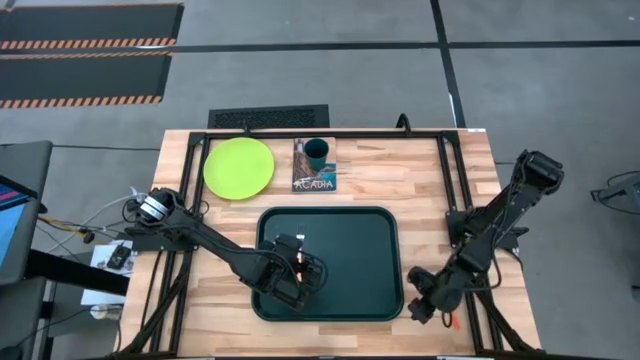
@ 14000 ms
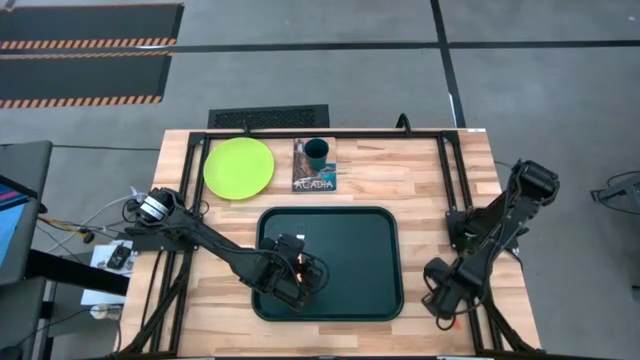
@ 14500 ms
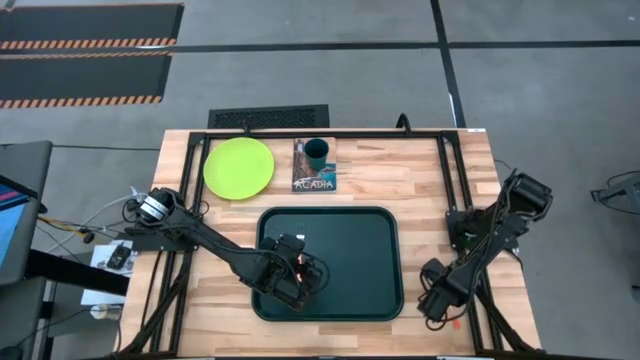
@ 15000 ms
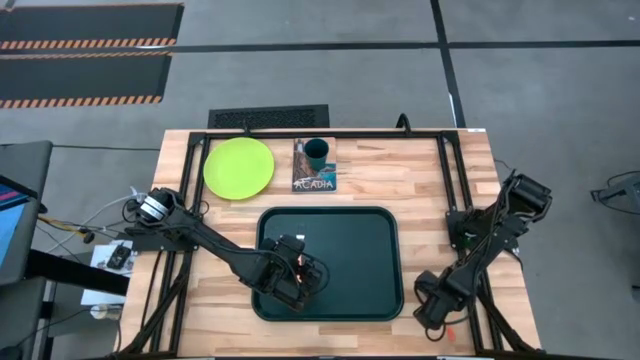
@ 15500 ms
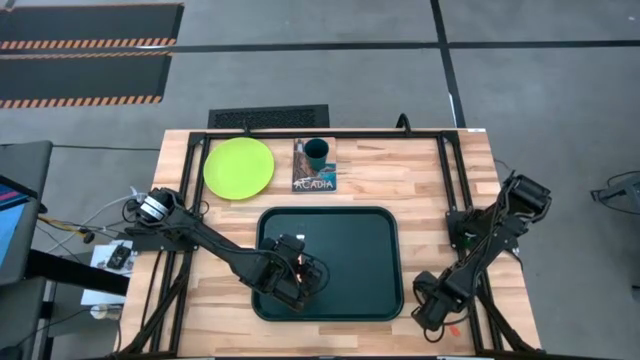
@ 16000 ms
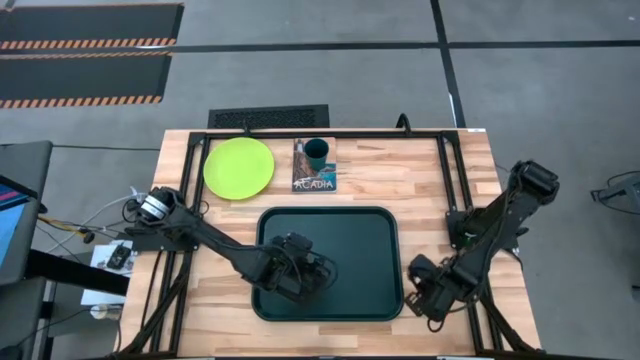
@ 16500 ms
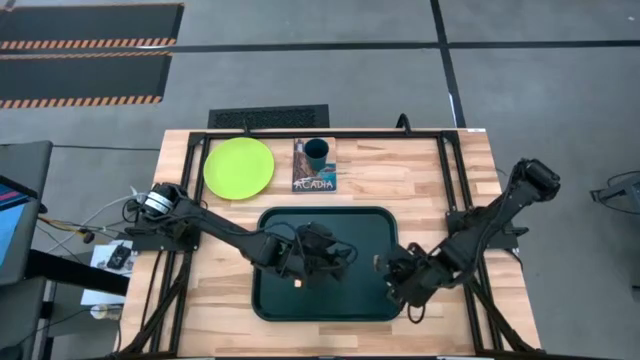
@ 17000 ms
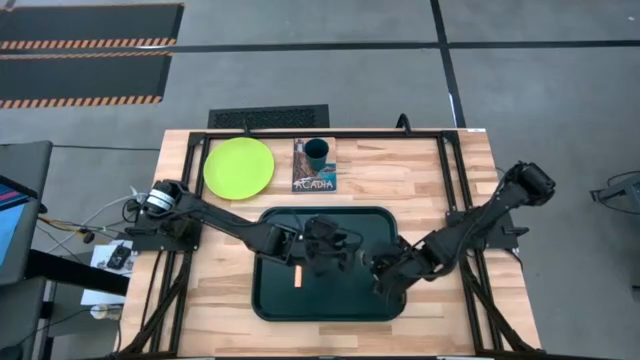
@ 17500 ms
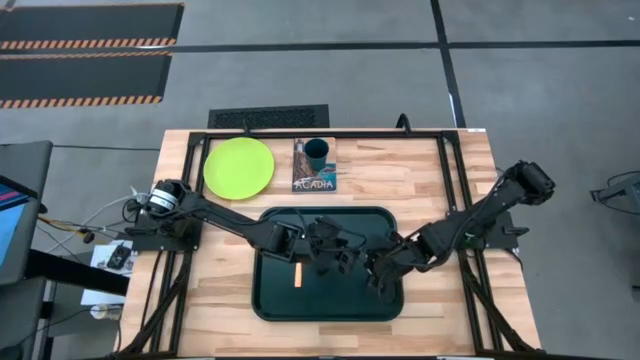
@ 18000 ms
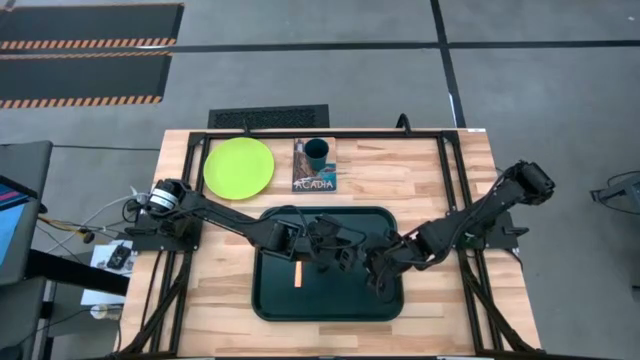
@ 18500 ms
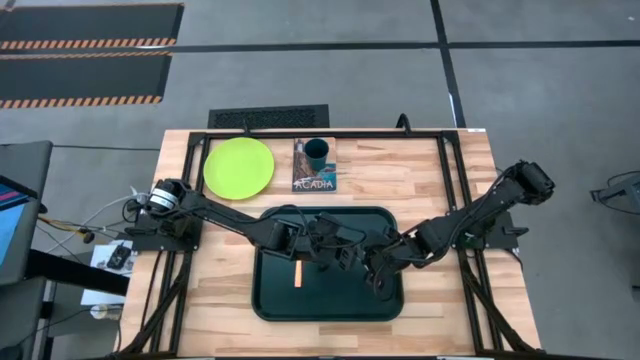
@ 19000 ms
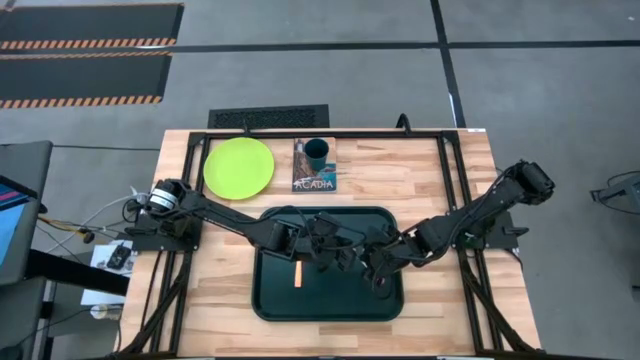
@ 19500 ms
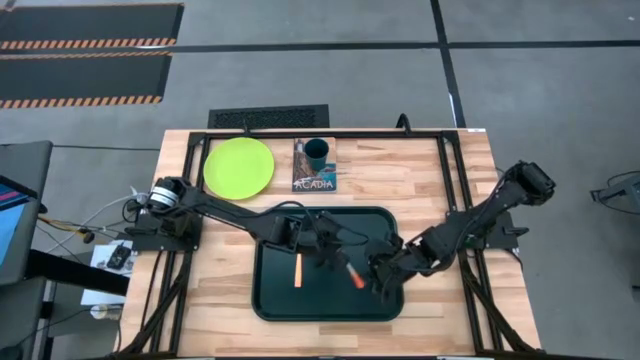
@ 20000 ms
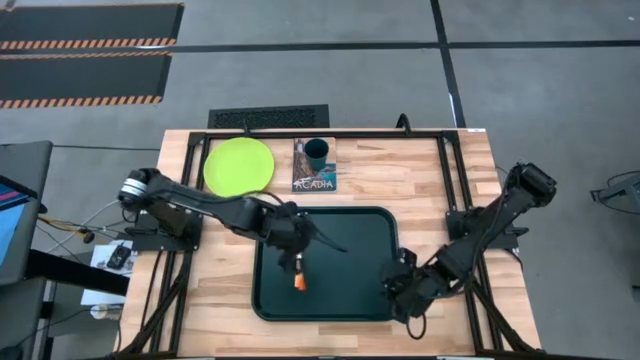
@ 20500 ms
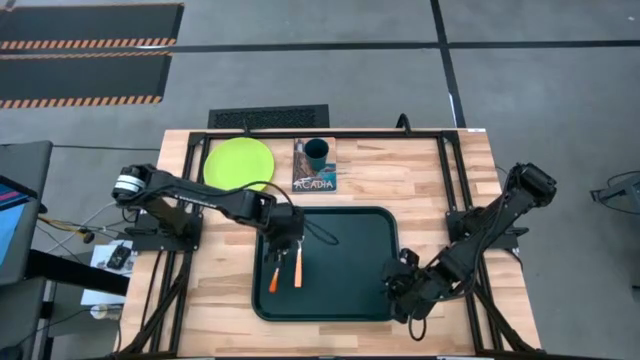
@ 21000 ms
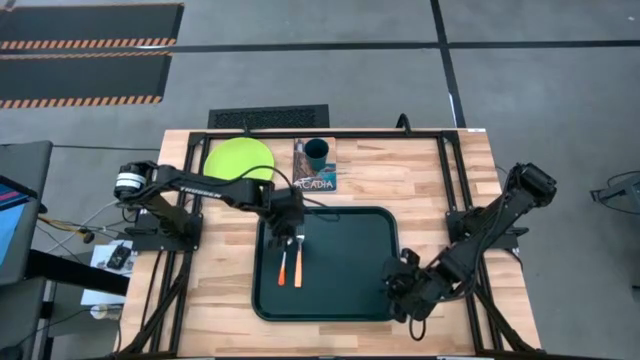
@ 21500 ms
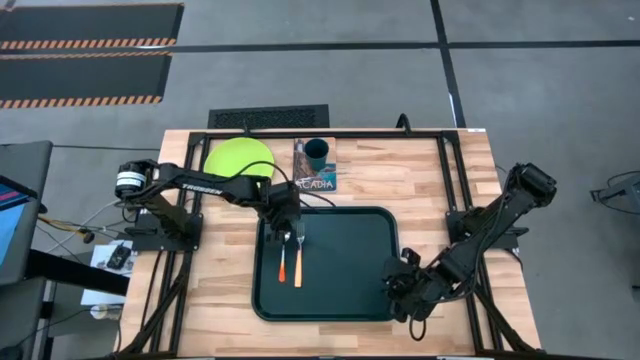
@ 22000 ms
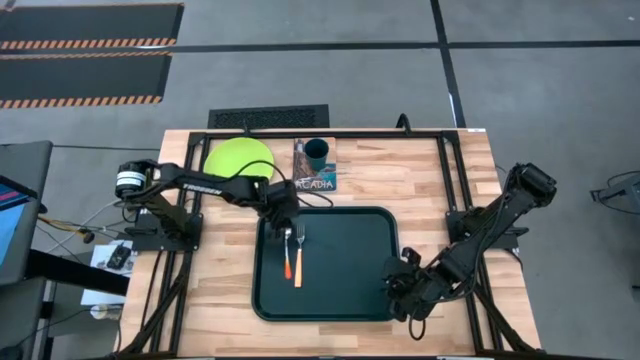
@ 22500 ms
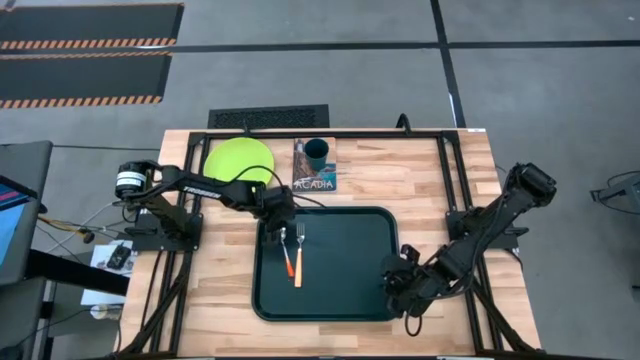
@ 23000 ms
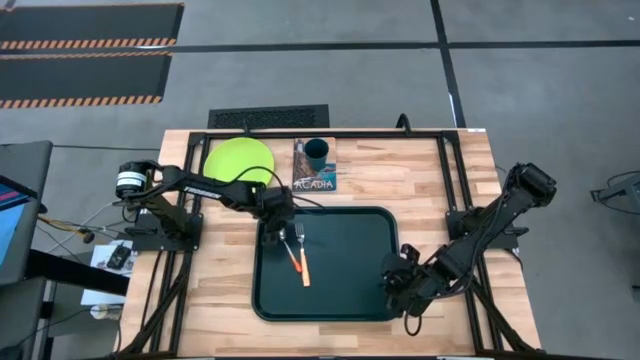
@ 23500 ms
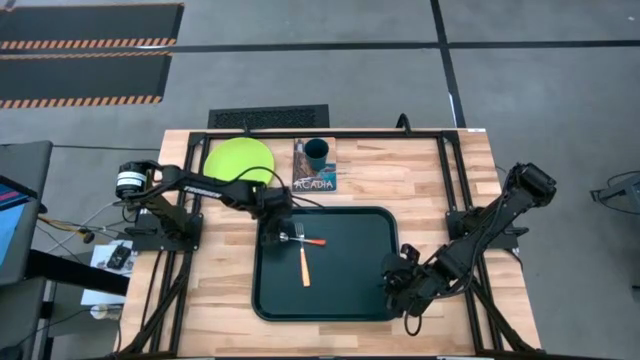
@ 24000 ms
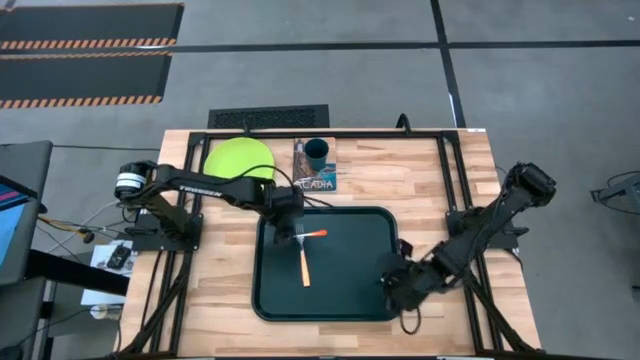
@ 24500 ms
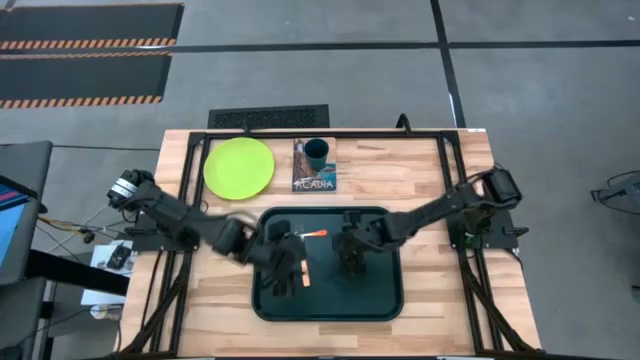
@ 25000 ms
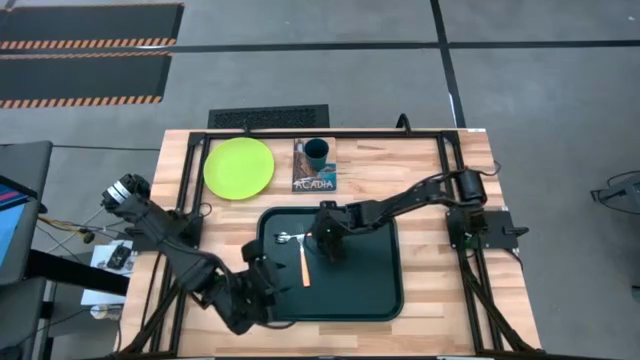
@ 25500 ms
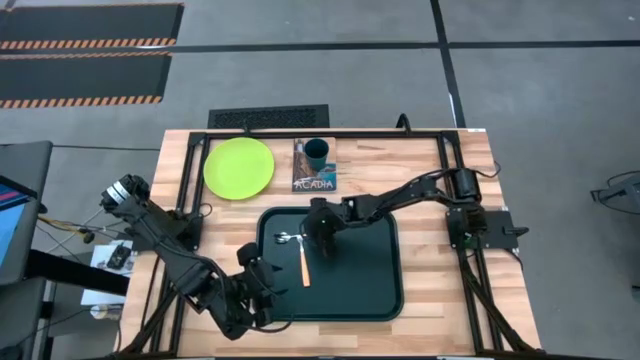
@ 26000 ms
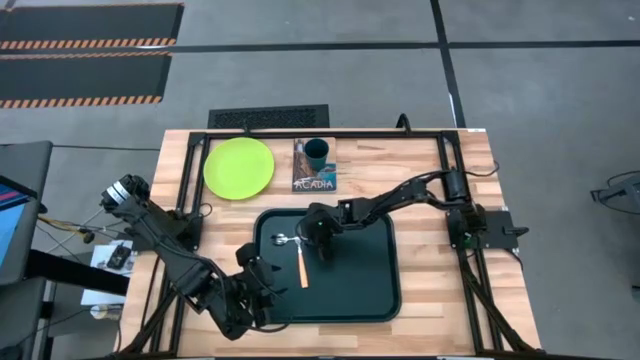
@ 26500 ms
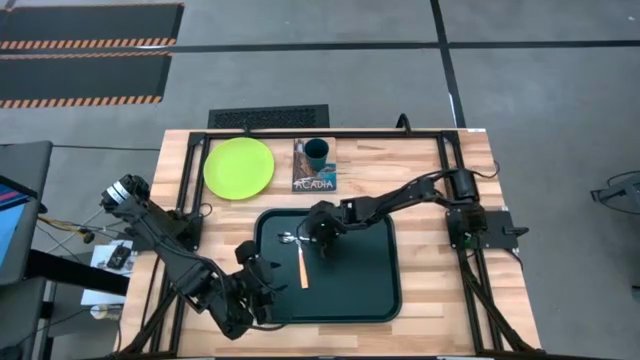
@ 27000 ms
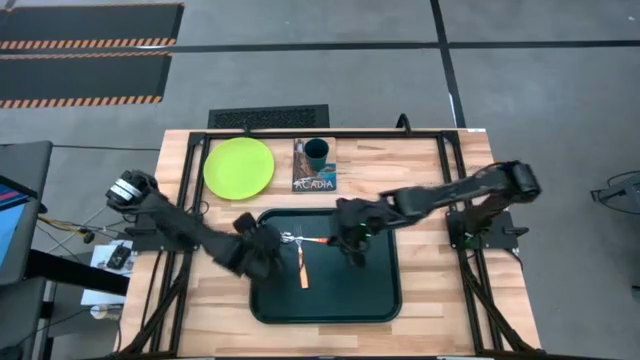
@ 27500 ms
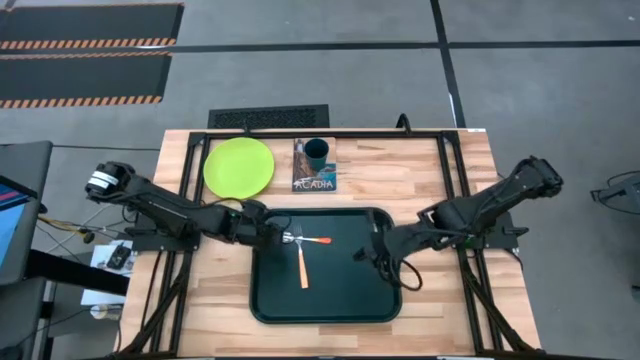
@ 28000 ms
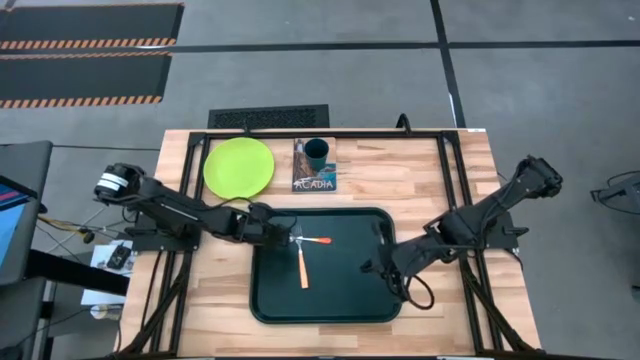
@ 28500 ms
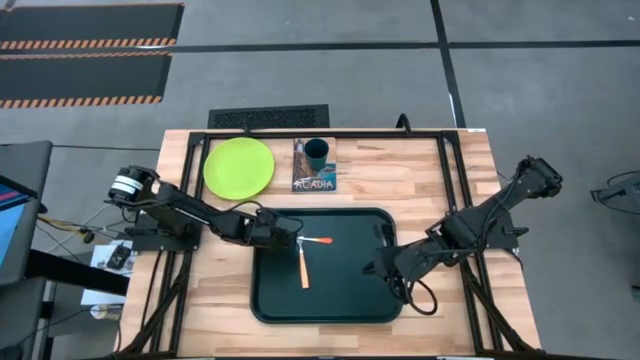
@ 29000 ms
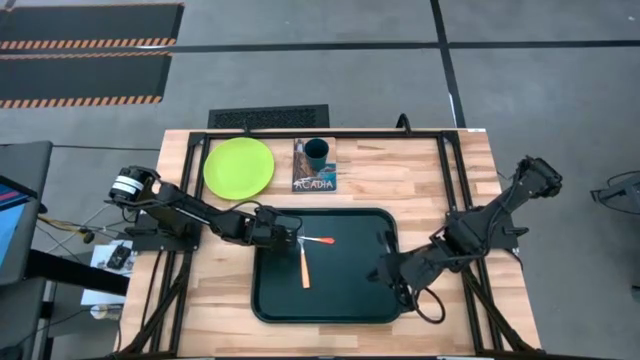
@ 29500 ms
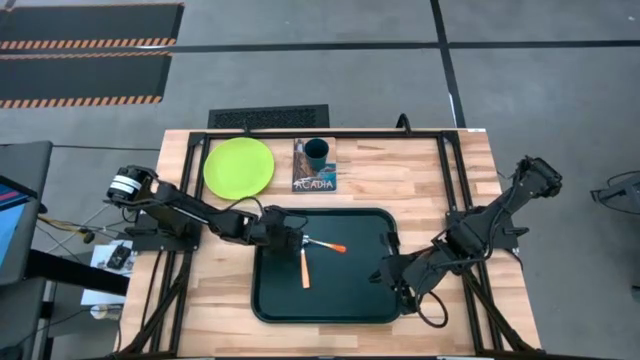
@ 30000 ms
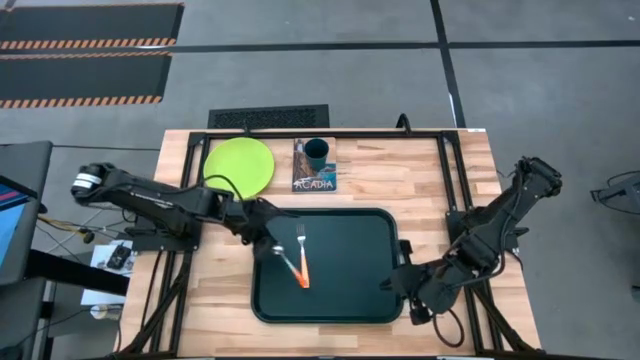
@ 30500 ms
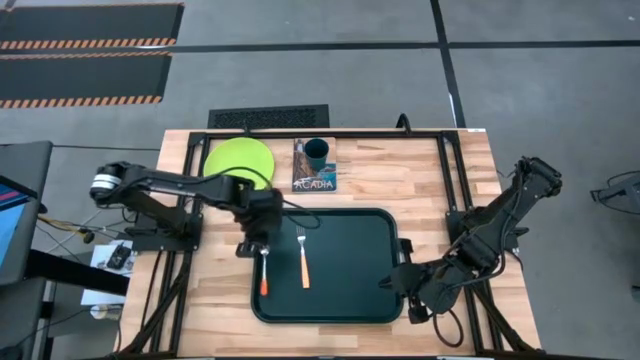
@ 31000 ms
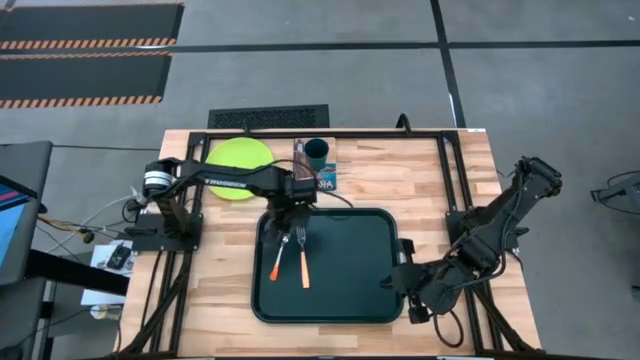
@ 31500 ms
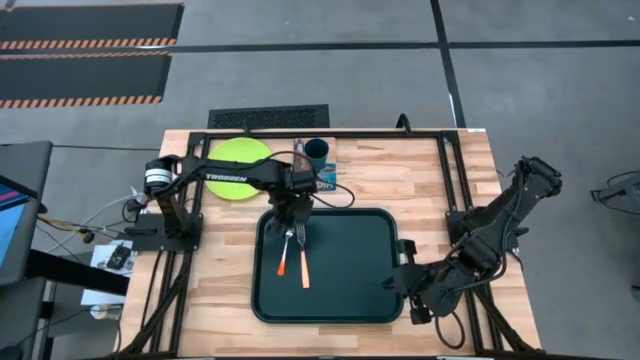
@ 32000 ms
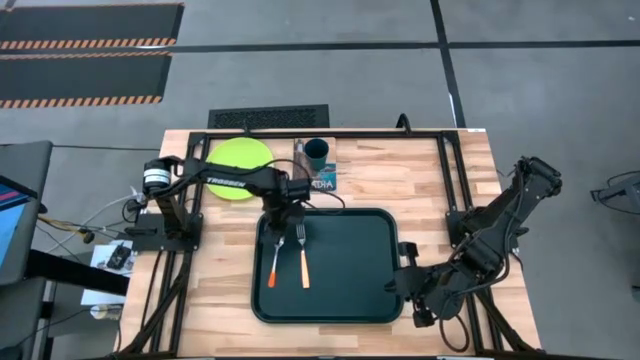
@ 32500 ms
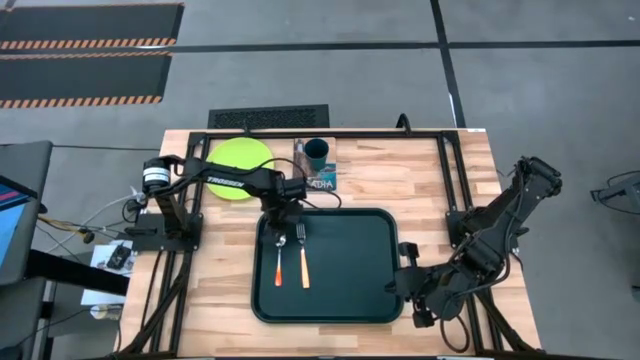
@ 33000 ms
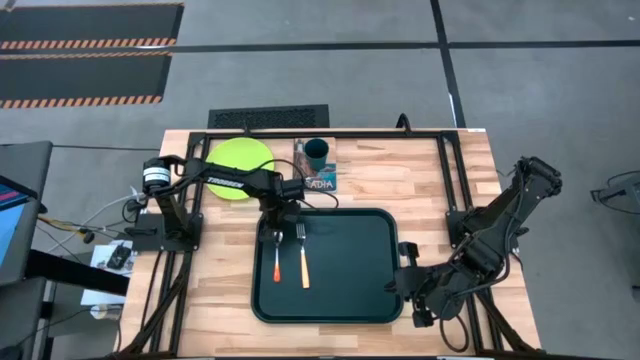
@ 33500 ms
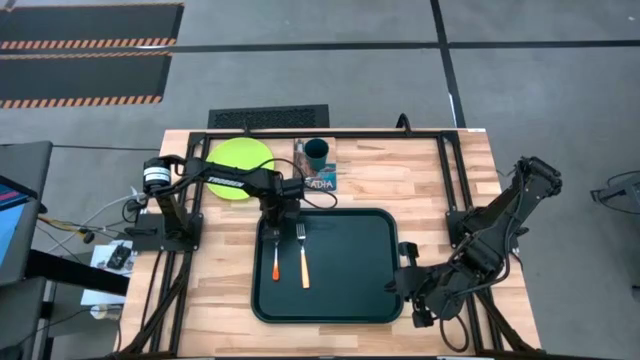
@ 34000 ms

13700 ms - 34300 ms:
Task: Pick and place plate/cup/fork/spoon on tray
Put the orange spoon on the black tray to the left of the orange fork
